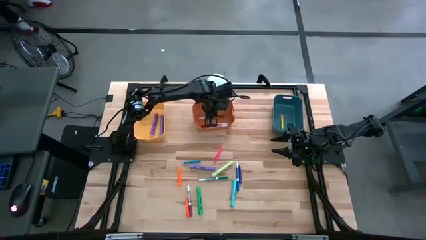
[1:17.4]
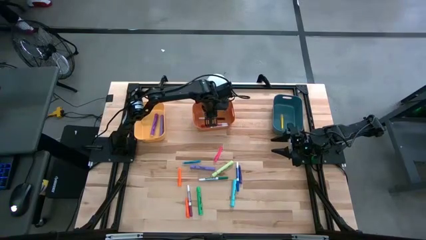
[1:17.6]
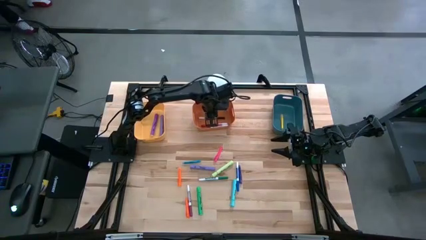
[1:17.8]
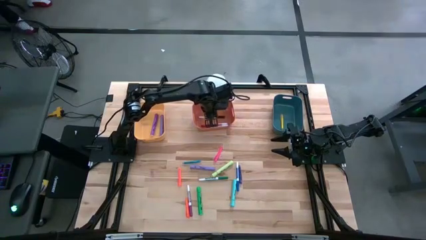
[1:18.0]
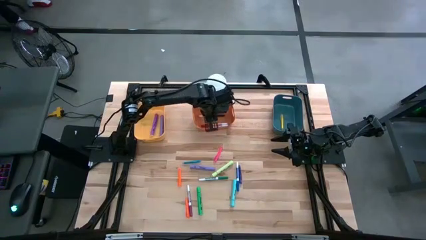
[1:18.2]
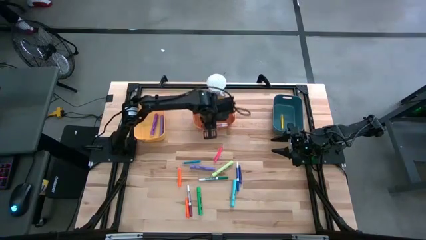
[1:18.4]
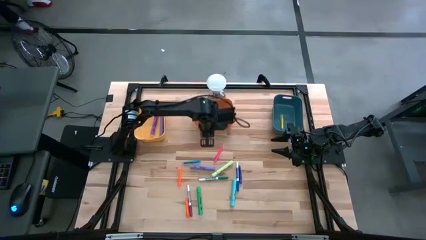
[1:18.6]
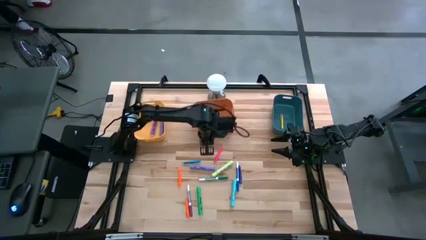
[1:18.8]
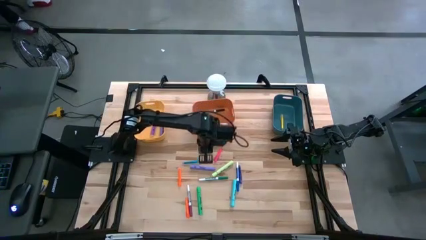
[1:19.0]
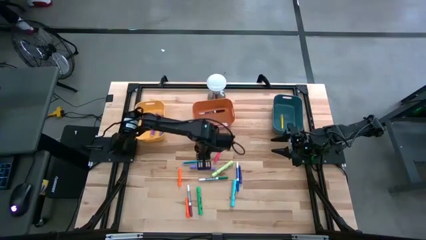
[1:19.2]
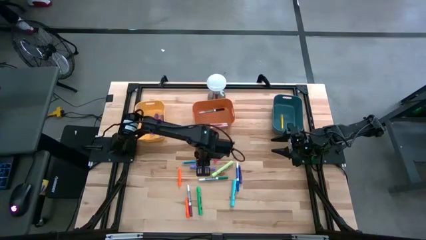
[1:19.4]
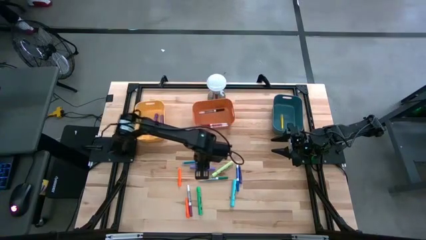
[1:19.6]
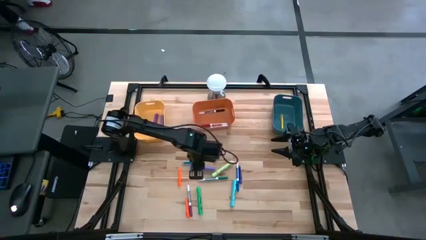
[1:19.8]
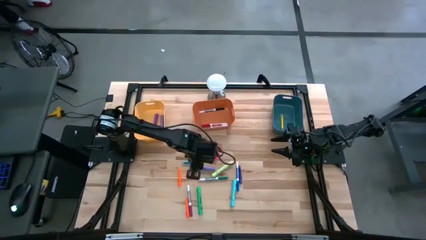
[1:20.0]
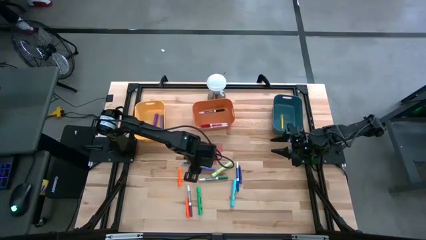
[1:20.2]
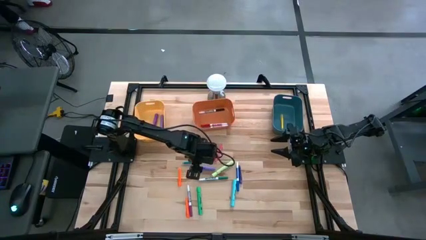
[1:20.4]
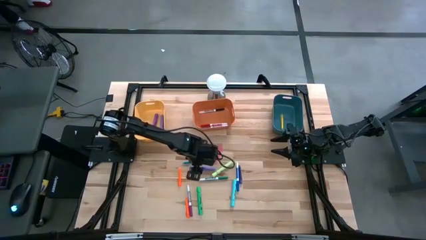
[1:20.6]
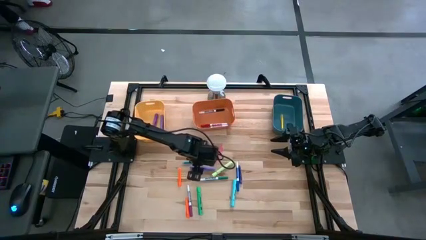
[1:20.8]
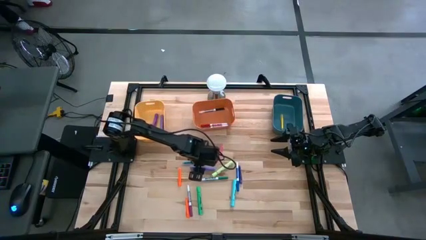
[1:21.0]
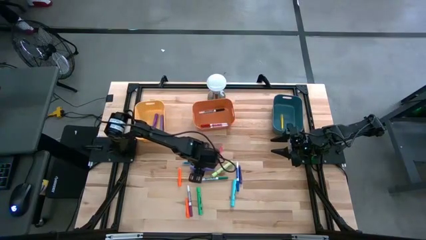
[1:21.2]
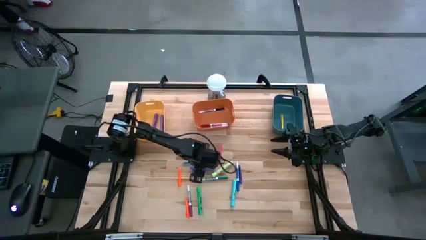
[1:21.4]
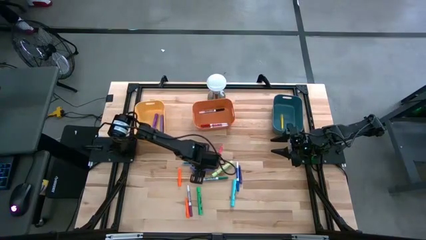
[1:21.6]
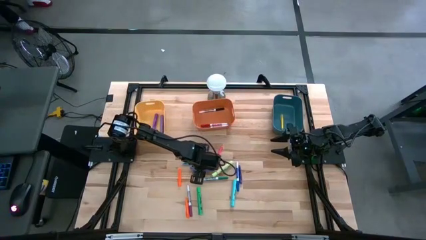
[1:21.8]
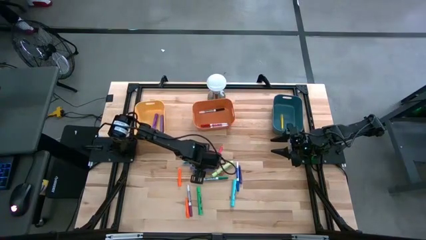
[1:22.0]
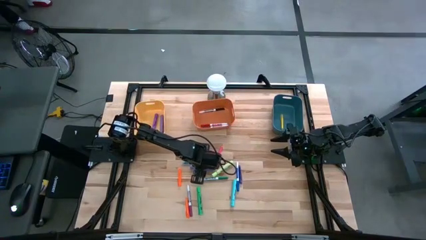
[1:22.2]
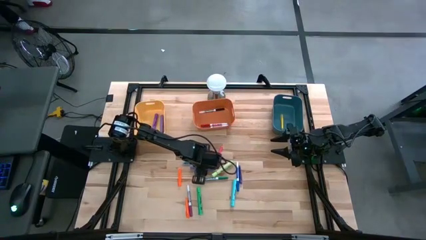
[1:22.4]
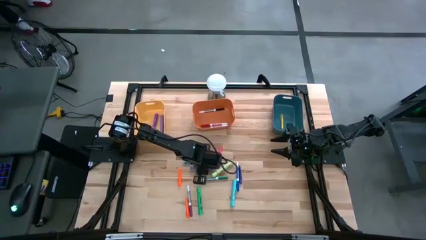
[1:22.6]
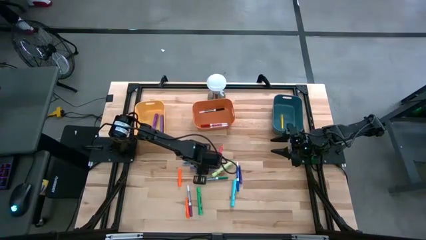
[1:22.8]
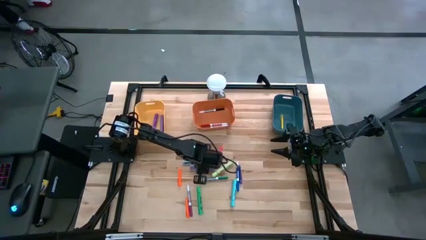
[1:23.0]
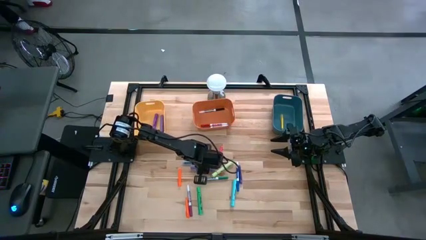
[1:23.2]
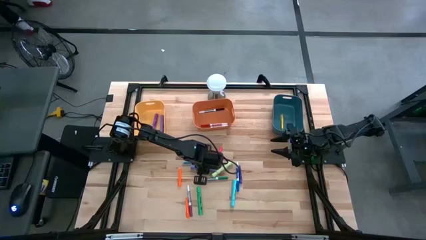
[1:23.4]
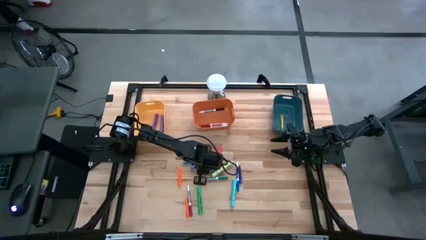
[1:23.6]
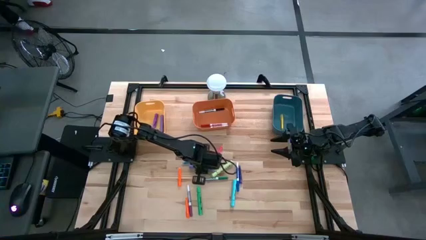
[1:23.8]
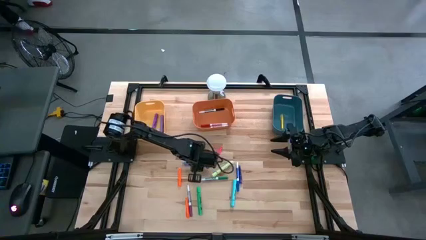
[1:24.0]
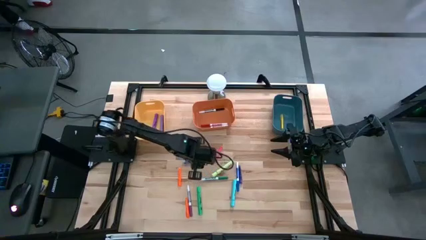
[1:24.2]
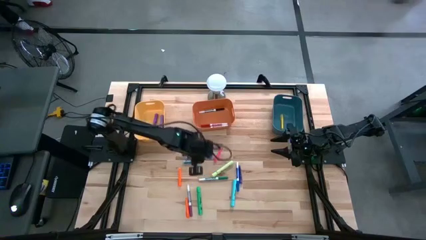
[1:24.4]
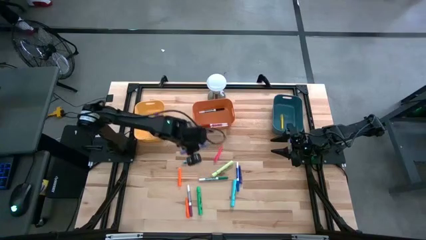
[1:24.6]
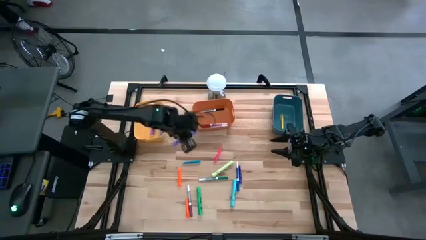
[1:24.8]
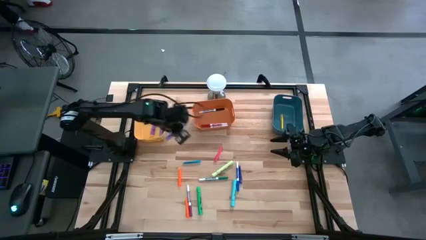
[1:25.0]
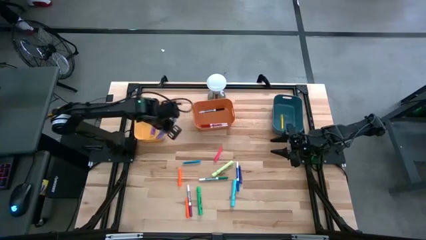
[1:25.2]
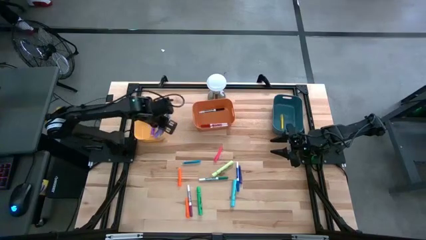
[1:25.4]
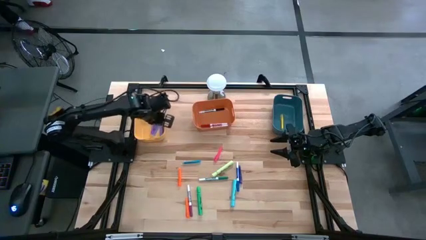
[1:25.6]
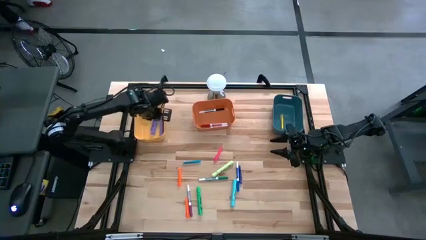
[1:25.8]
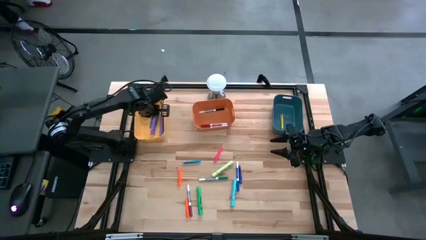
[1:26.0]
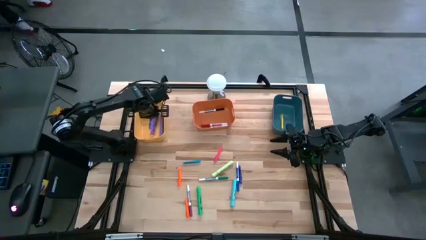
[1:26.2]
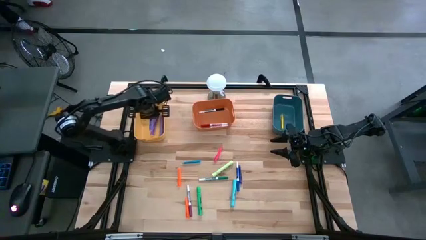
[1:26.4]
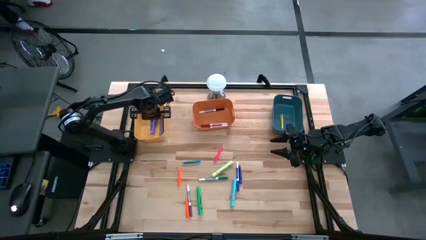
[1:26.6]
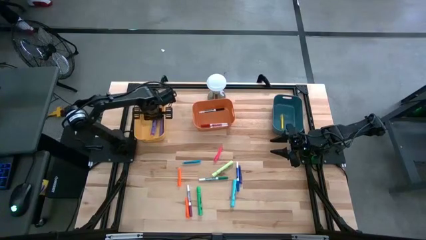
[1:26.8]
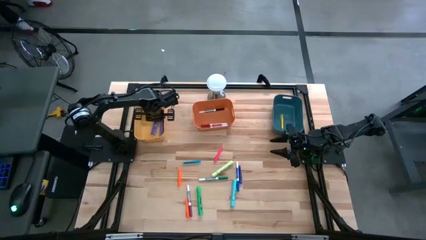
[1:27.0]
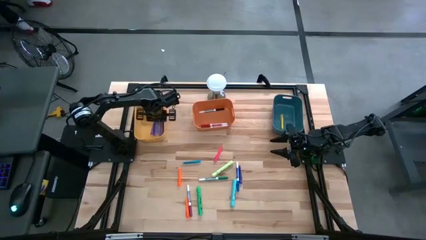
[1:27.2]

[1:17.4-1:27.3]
Task: Pick & Place Markers
Put the purple highlighter pen into the yellow bin

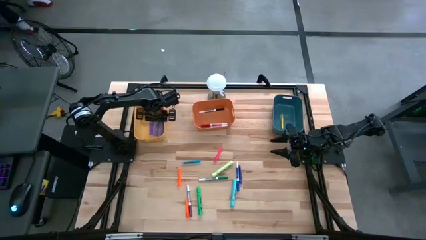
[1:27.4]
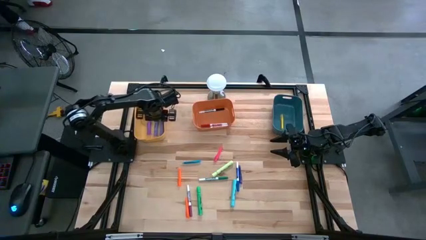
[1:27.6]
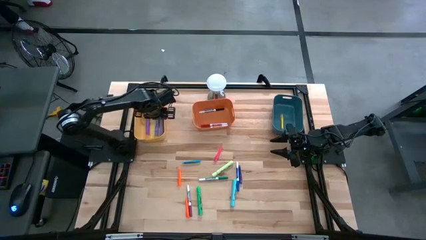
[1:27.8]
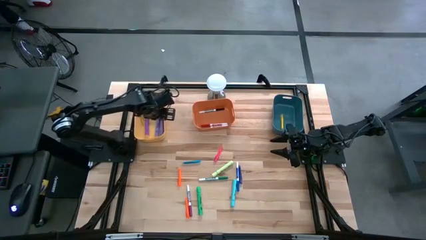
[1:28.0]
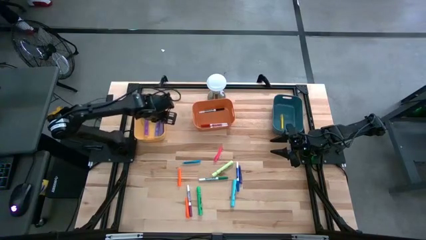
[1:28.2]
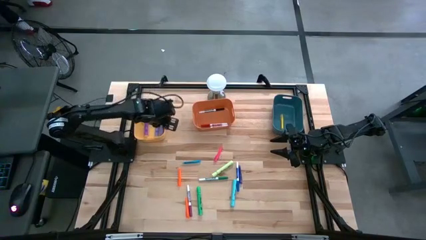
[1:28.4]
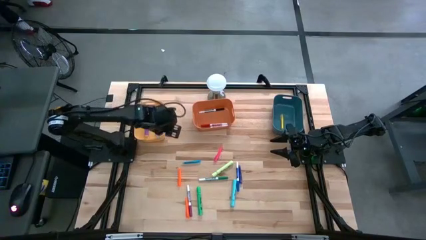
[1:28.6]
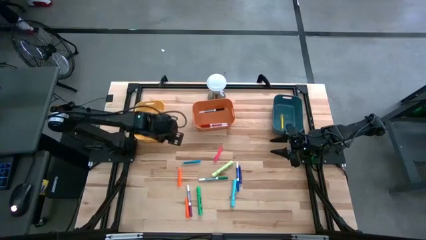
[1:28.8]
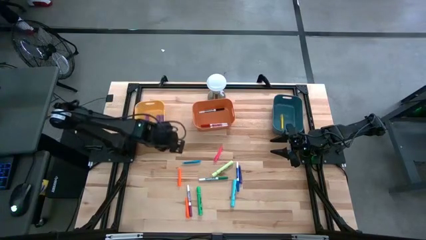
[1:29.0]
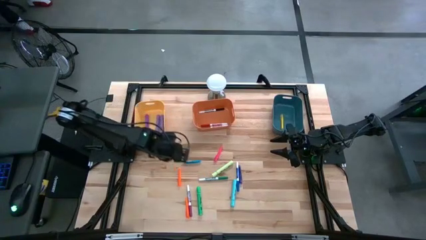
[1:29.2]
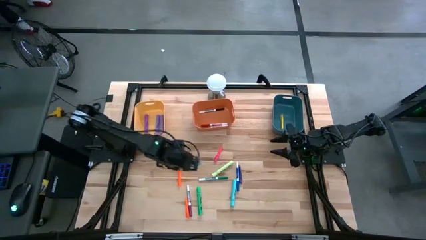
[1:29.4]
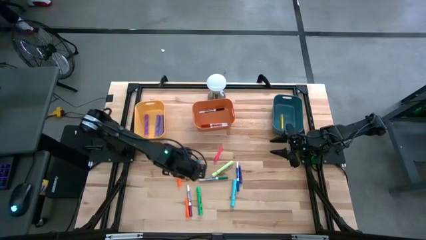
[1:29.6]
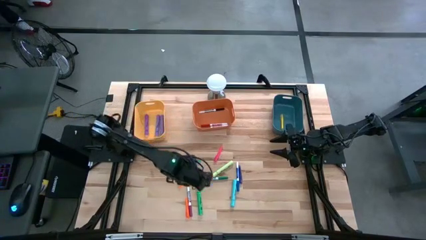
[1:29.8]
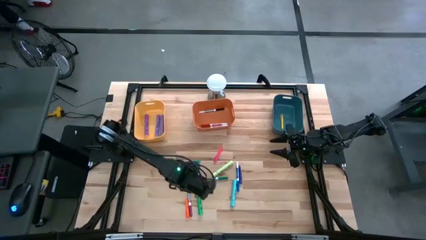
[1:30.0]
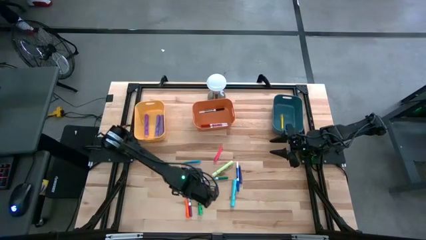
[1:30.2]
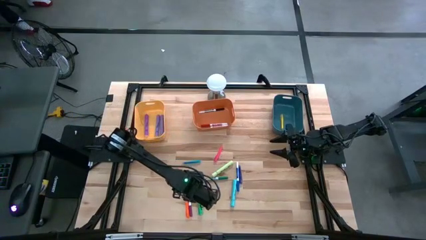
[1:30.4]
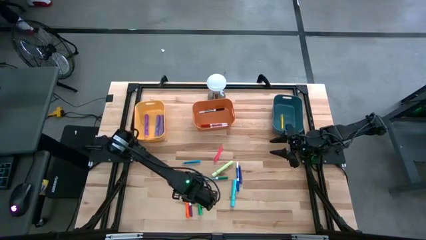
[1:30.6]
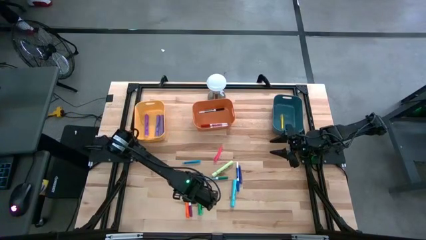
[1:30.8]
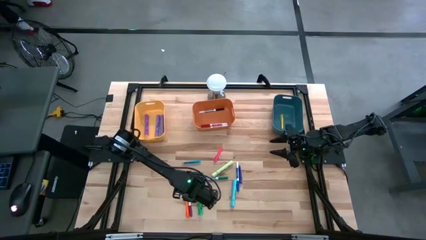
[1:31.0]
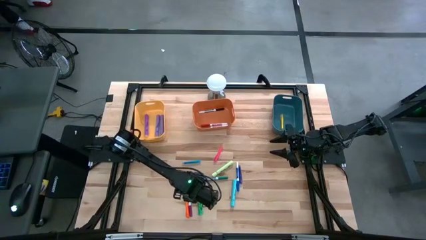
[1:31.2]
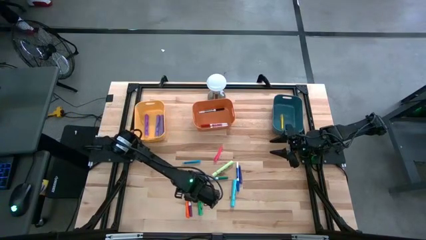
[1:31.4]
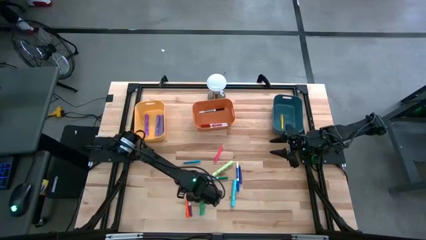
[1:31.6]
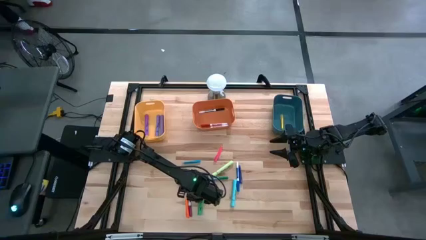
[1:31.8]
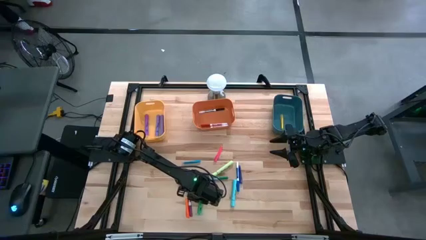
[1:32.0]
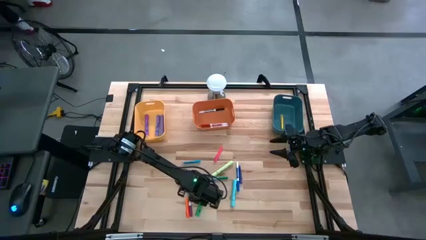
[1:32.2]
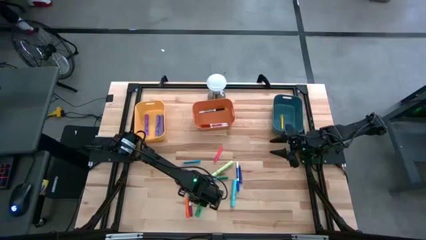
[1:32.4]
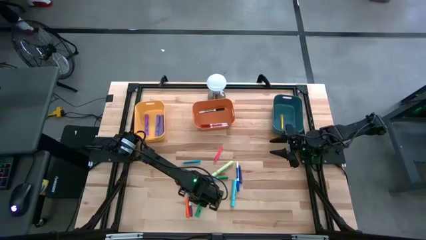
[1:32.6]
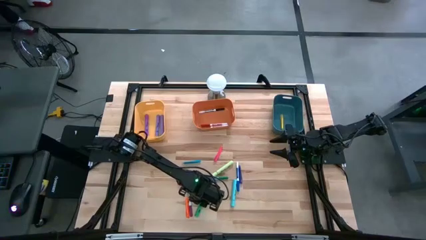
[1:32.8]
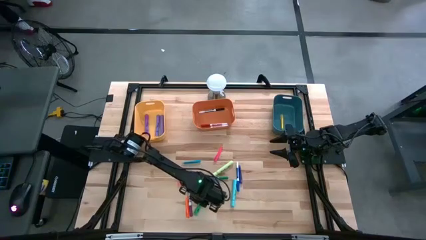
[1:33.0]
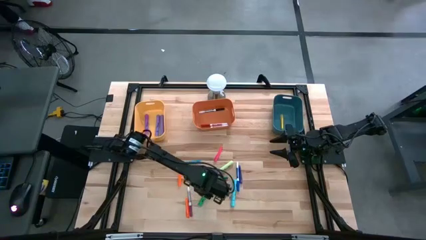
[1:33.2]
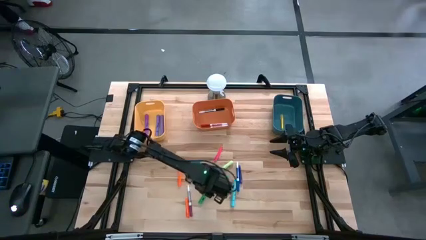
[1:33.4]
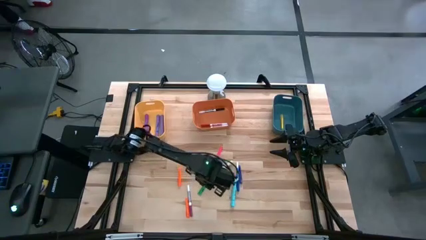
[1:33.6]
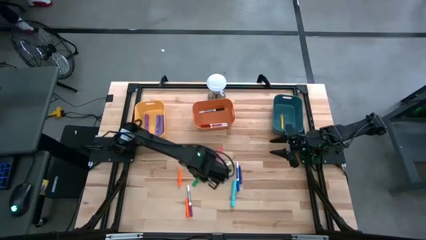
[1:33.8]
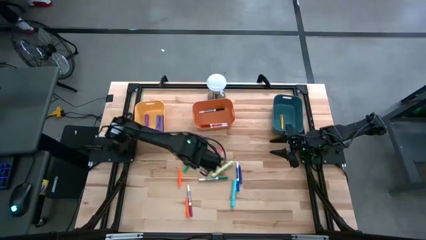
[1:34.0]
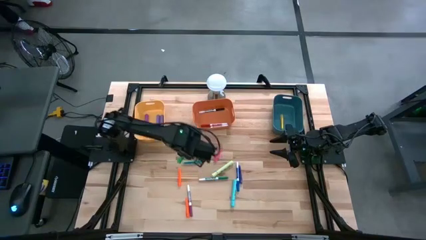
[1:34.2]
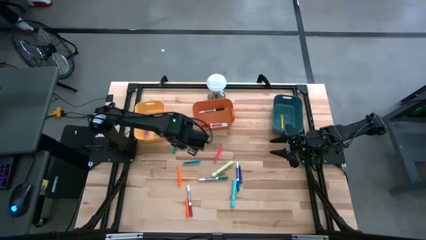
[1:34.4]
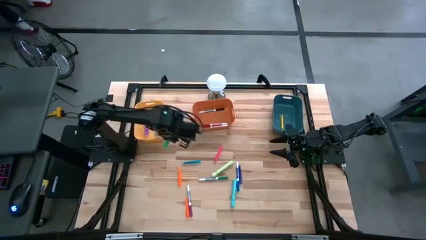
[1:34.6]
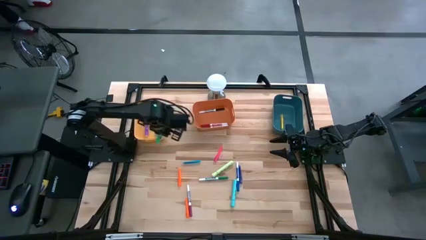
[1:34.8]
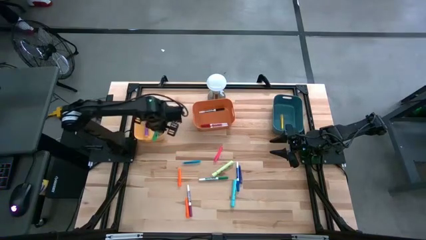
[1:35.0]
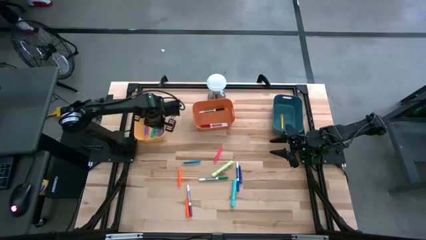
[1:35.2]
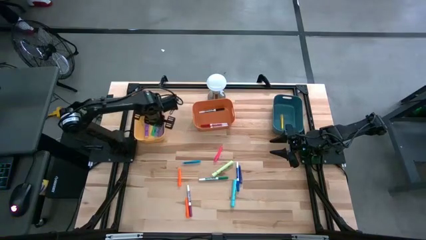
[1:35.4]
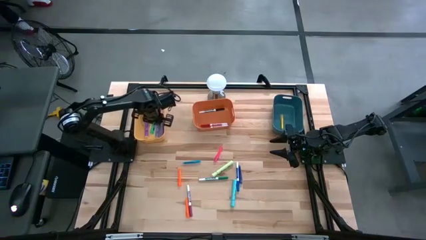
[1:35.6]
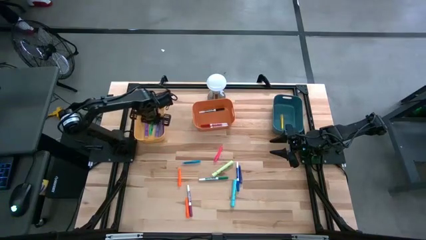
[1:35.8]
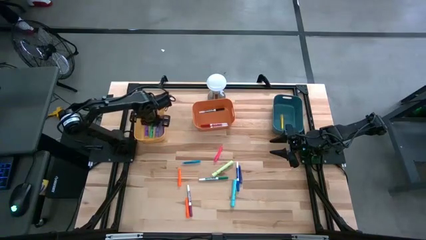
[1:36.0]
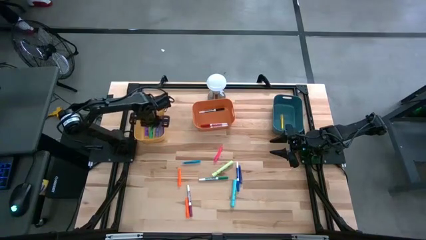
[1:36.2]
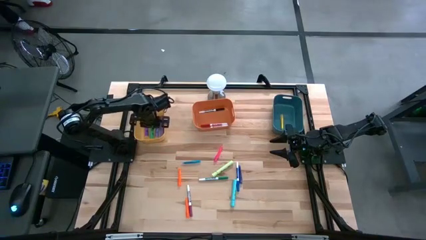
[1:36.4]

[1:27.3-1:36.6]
Put the green highlighter pen into the yellow bin
